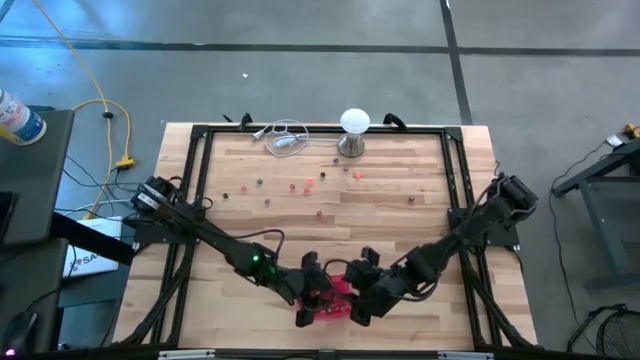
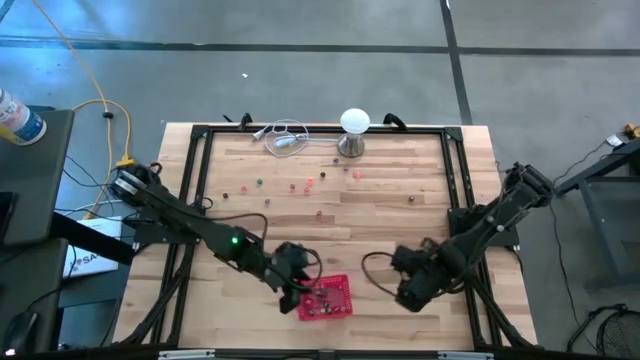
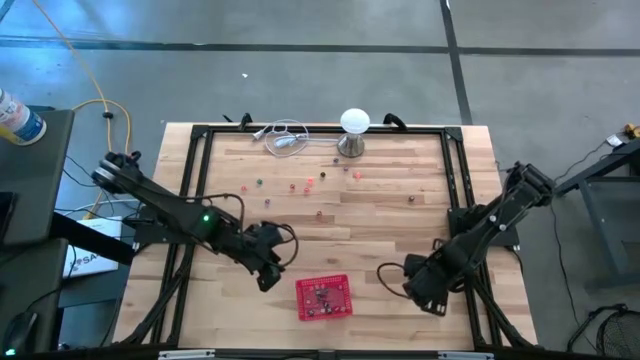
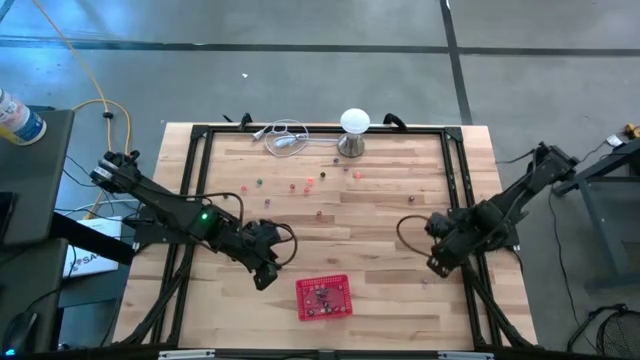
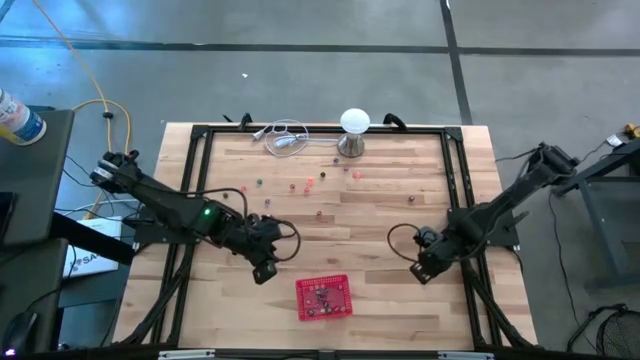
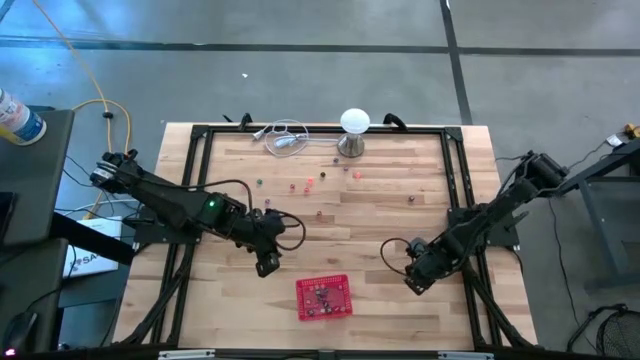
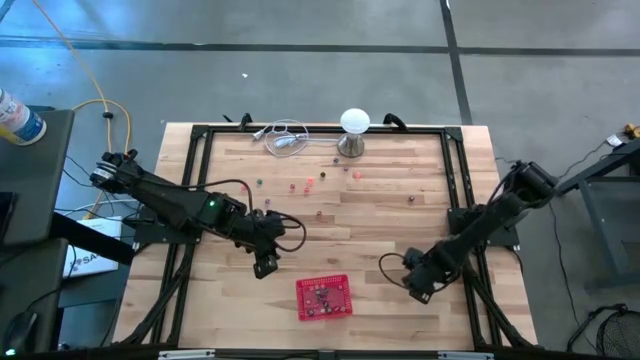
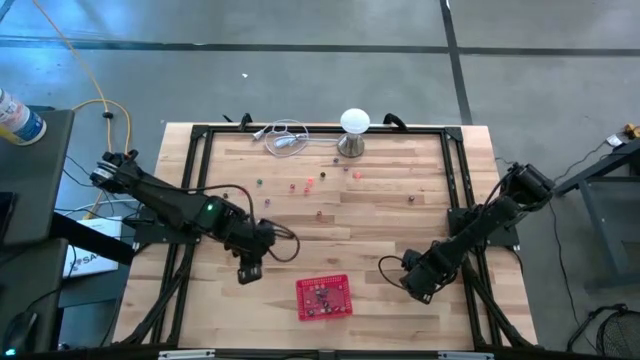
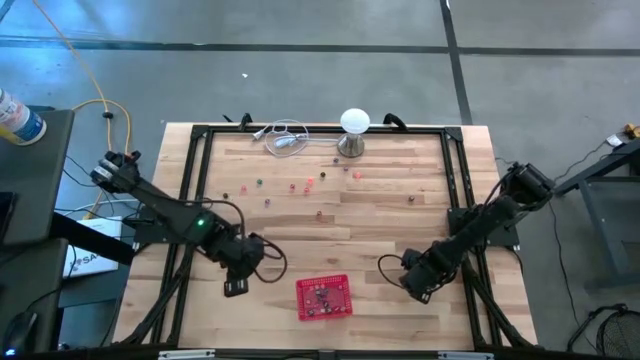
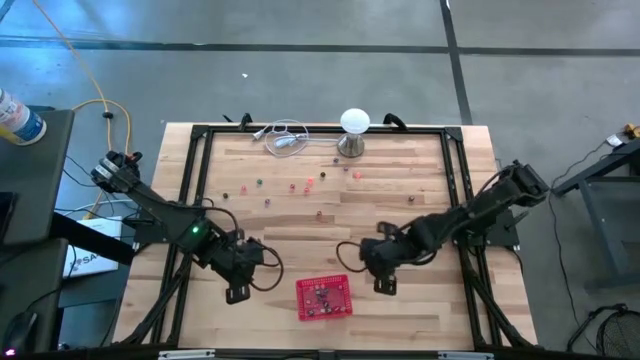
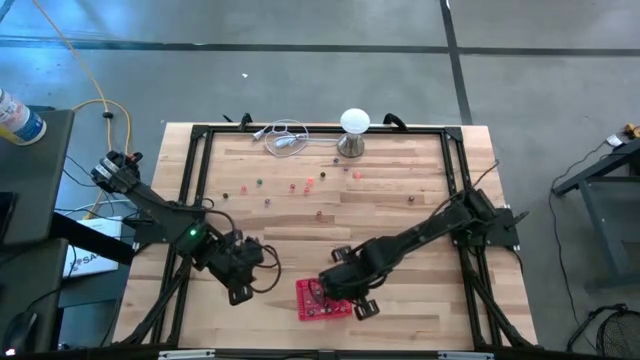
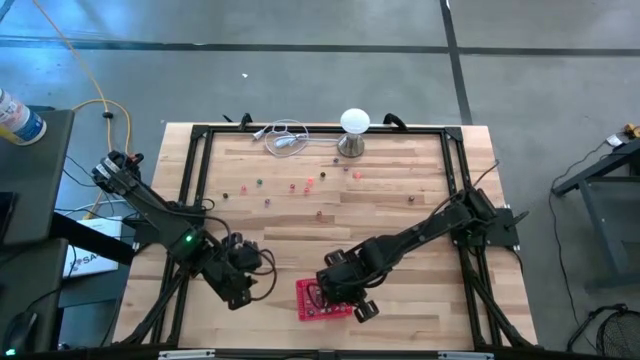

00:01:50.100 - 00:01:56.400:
Task: Pick & Place Dice
Put the purple dice into the red bin

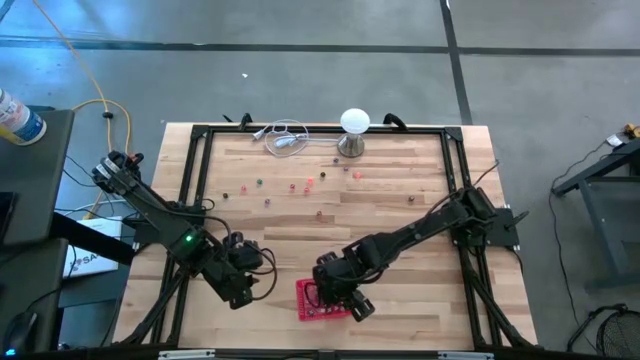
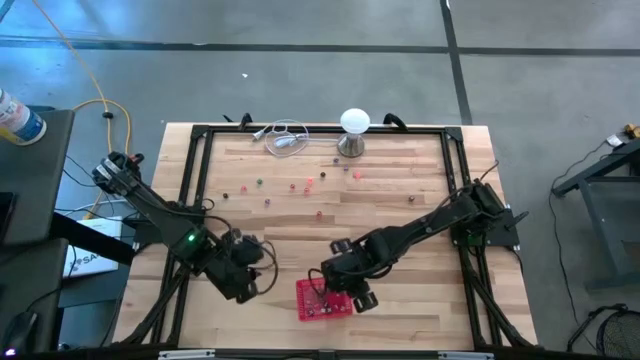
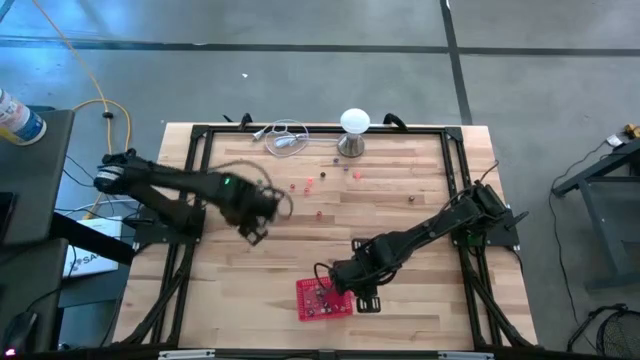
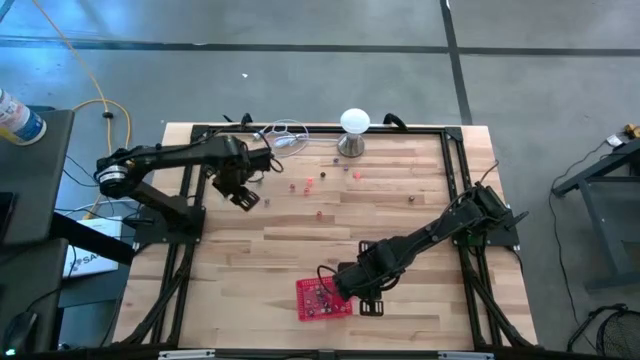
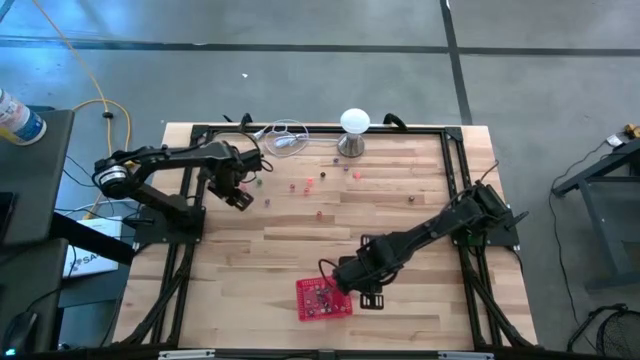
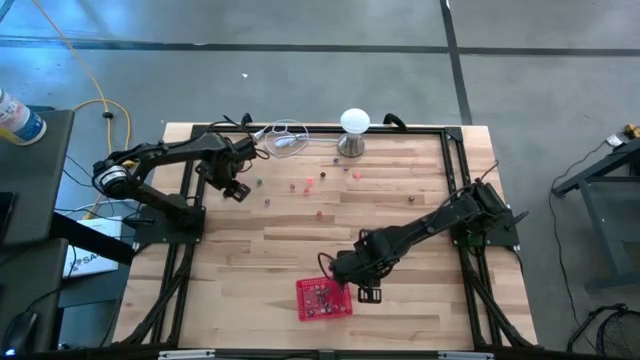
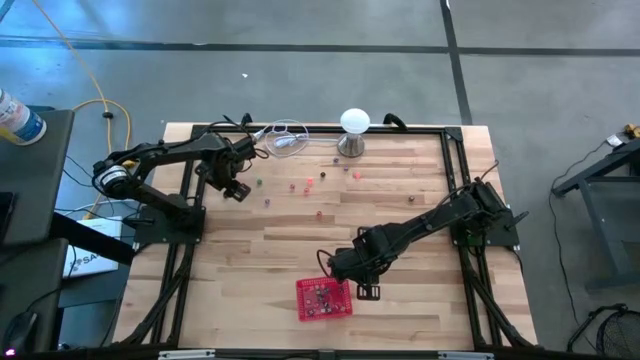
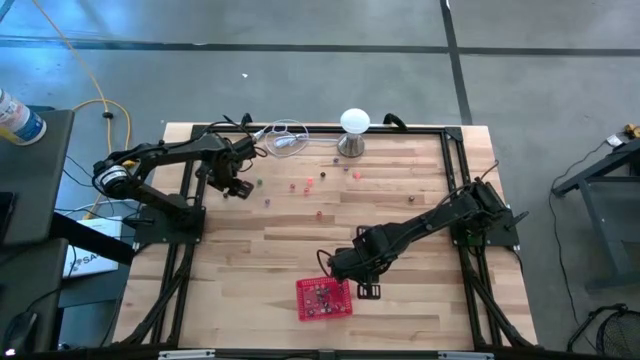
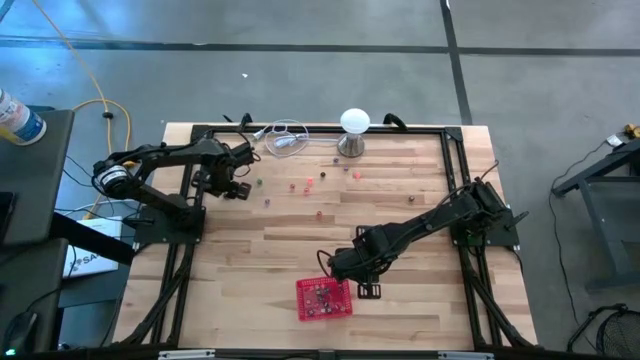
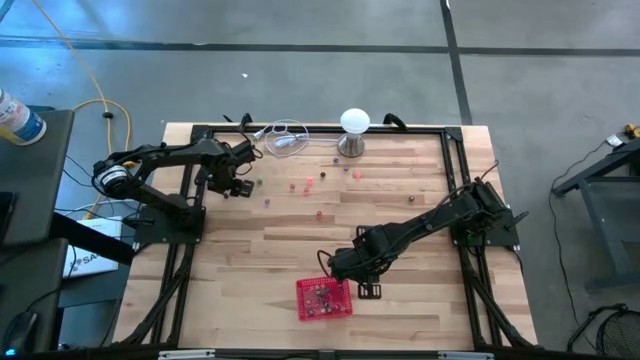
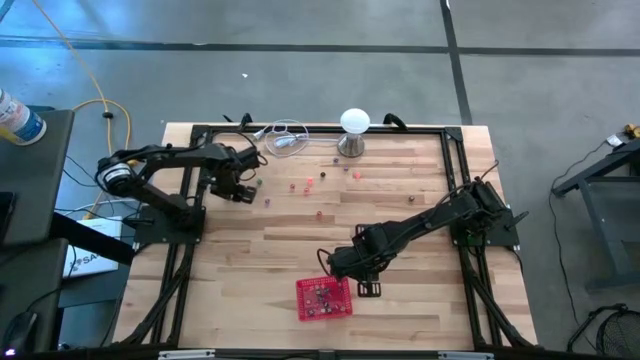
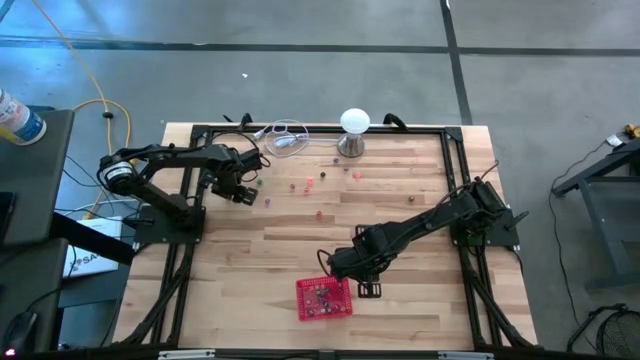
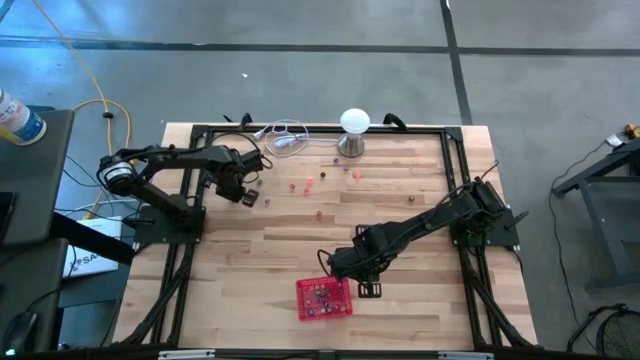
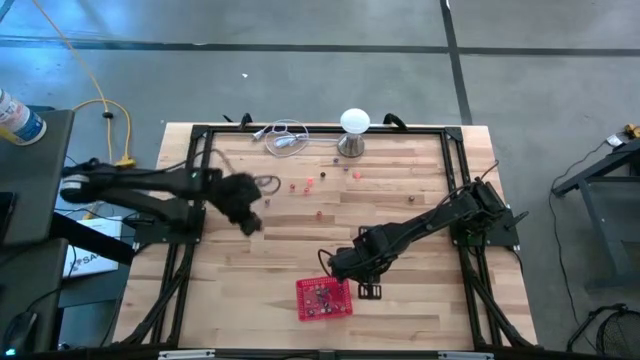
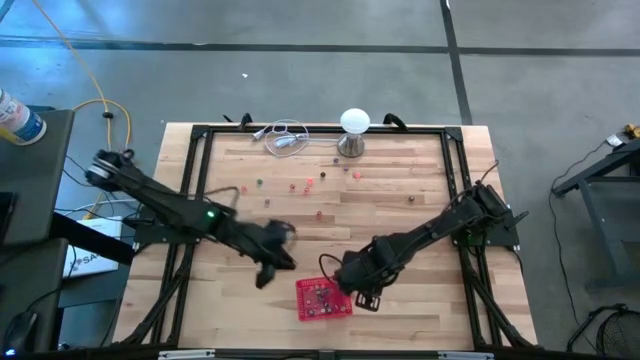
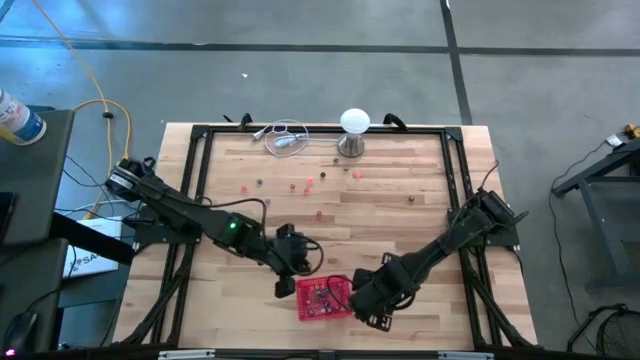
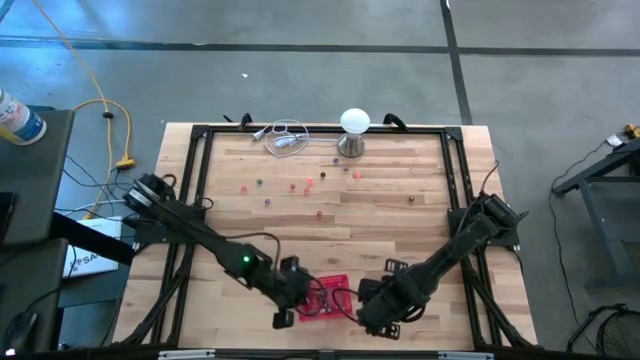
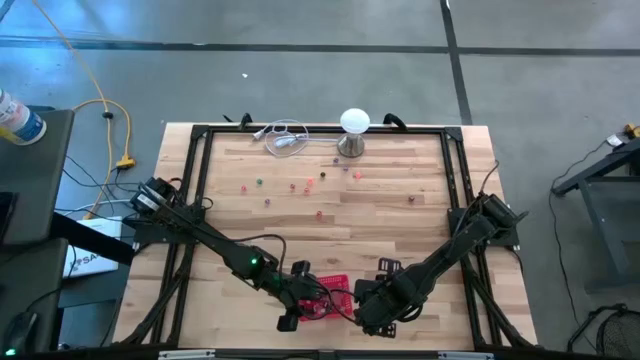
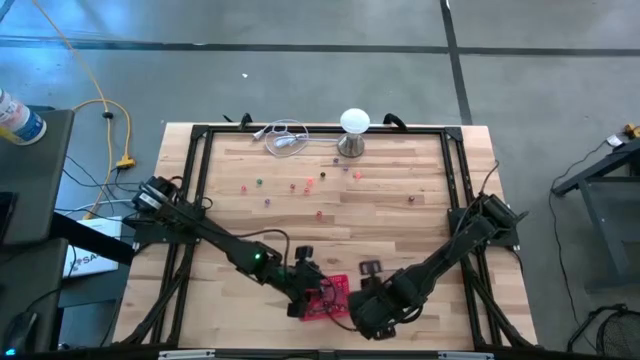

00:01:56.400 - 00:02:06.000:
Put the black dice into the red bin

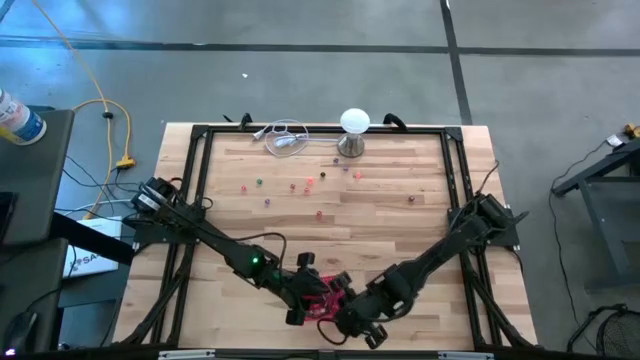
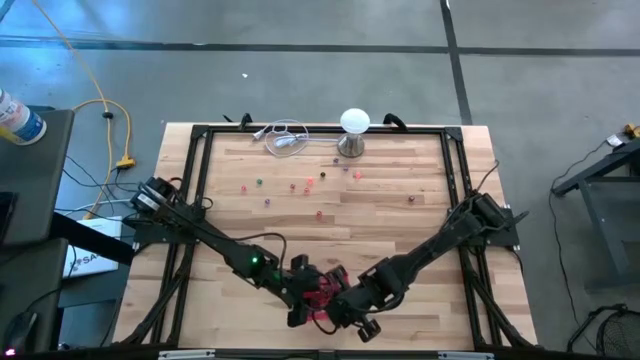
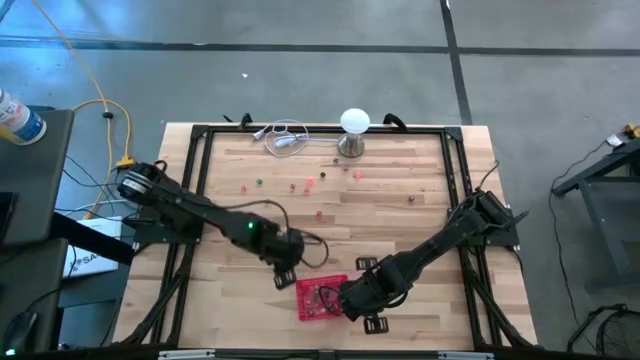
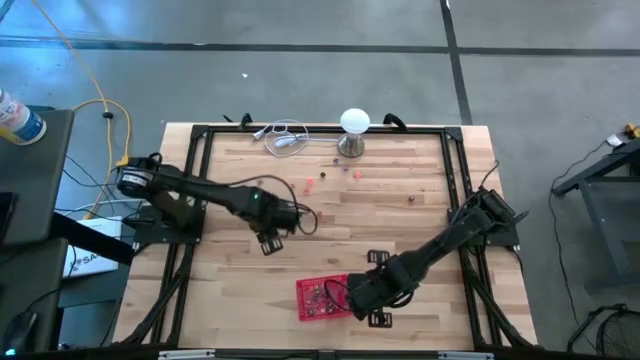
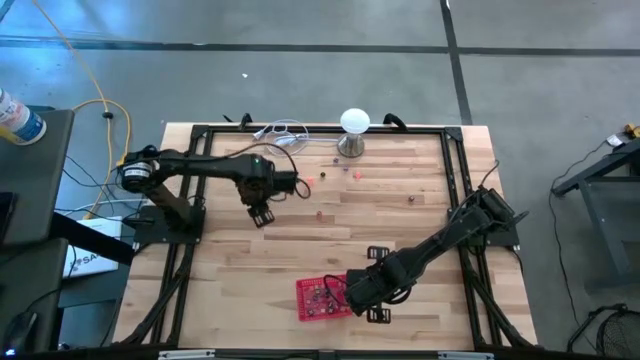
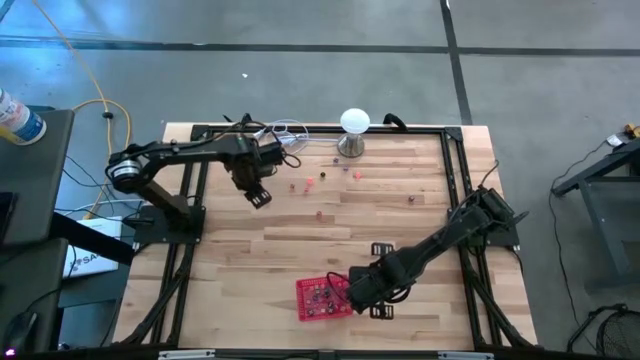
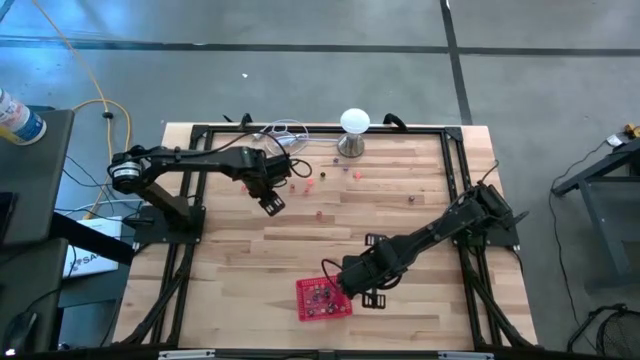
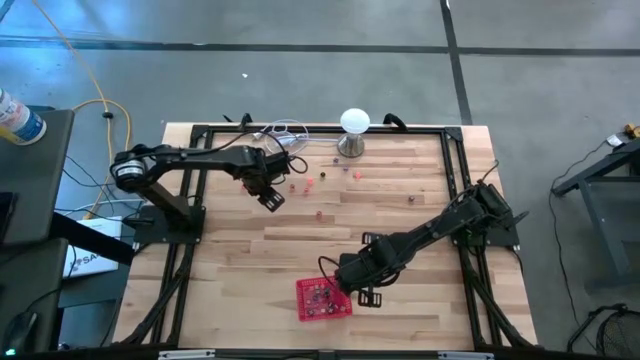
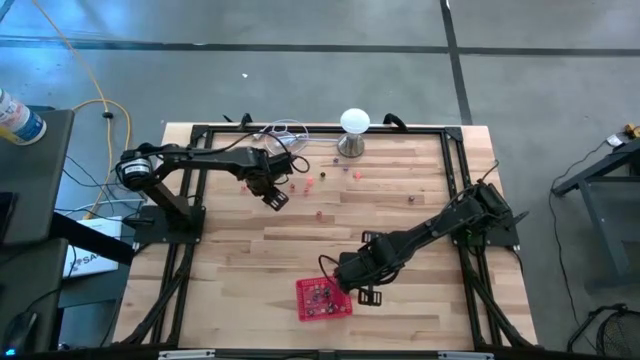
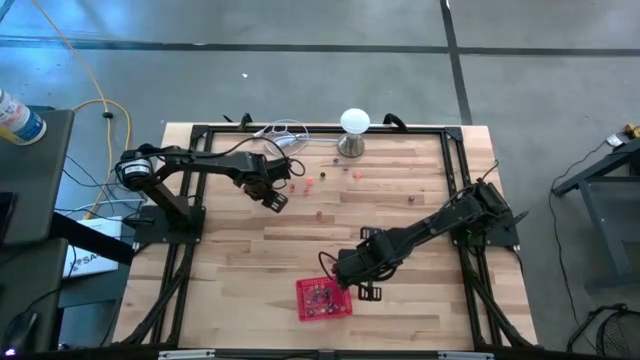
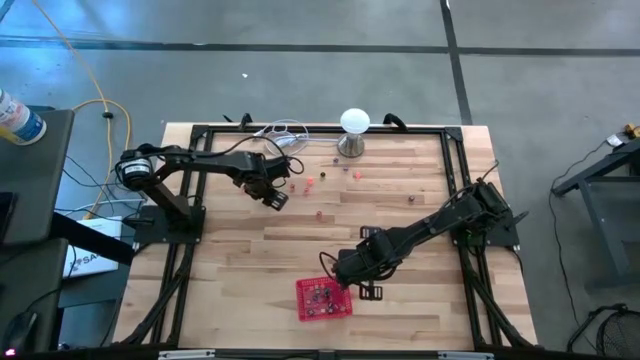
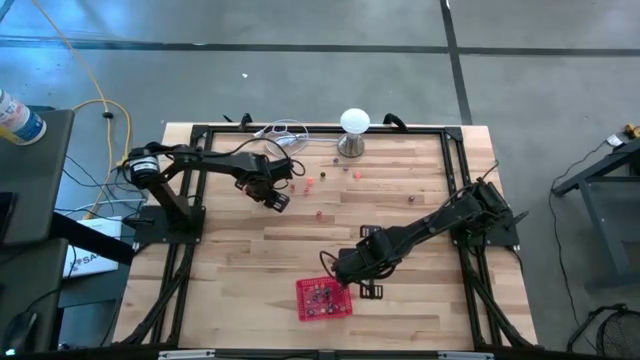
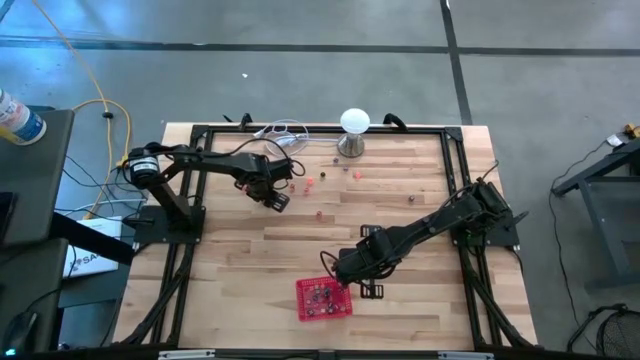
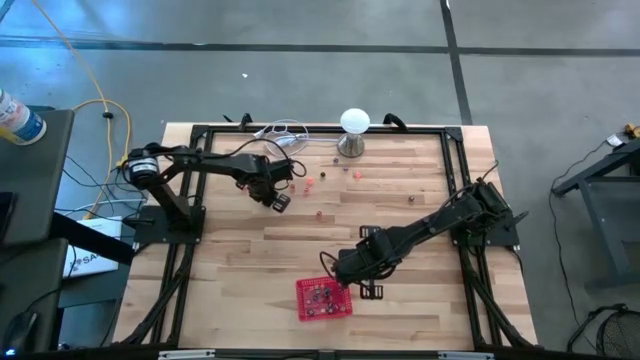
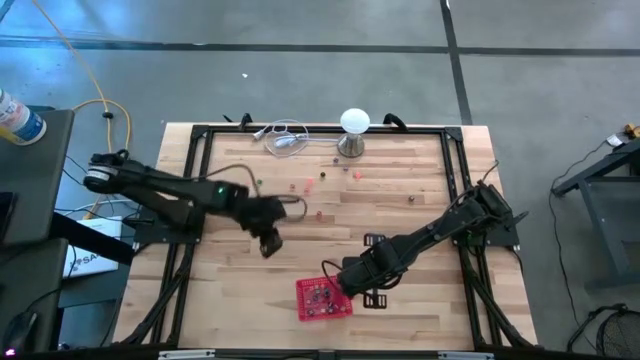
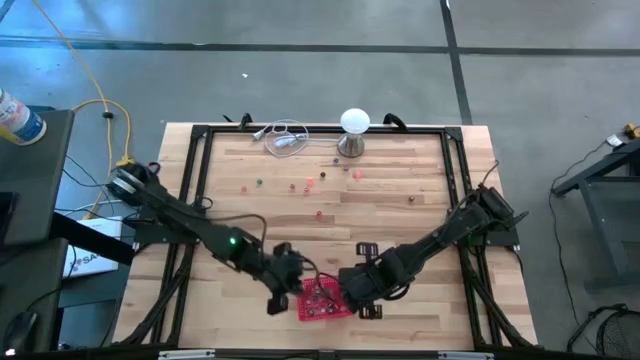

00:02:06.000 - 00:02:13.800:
Put the purple dice into the red bin

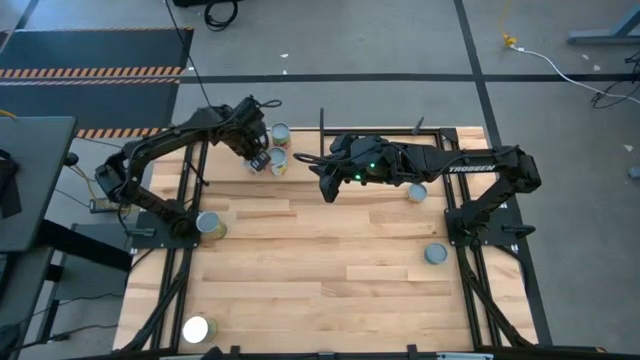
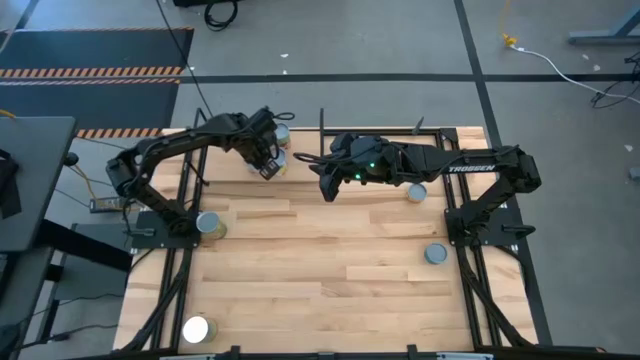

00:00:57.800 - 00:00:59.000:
Task: Pick and place cans onto a shelf
Adjust the canned mixed fruits on the shelf
